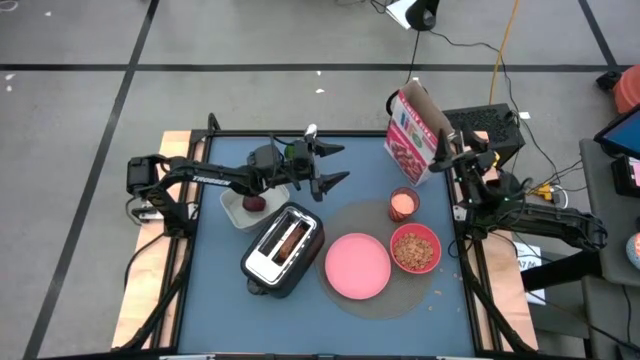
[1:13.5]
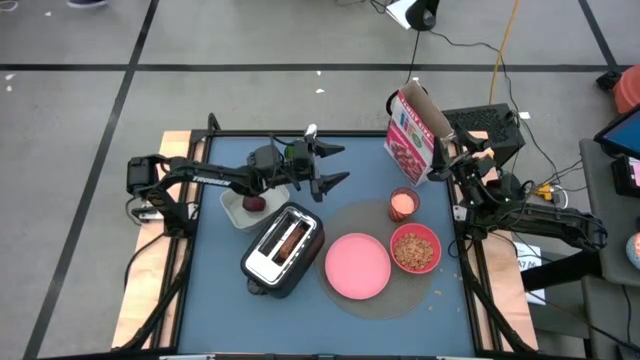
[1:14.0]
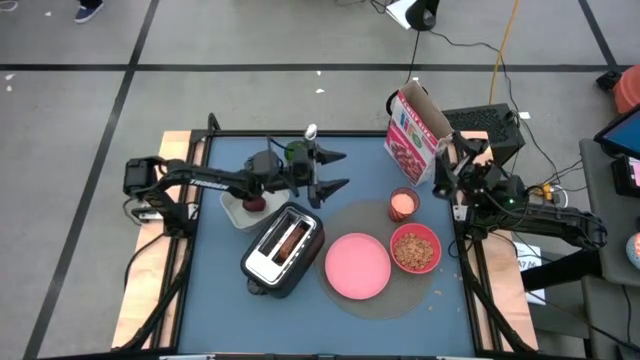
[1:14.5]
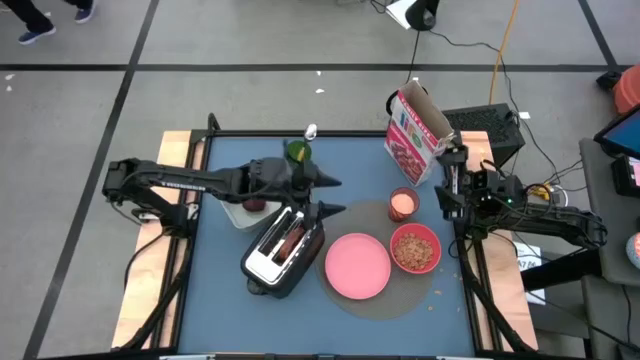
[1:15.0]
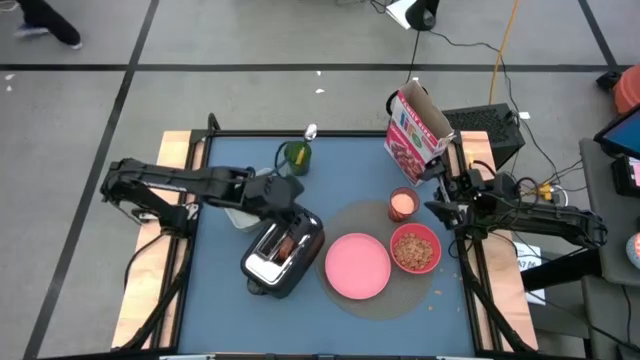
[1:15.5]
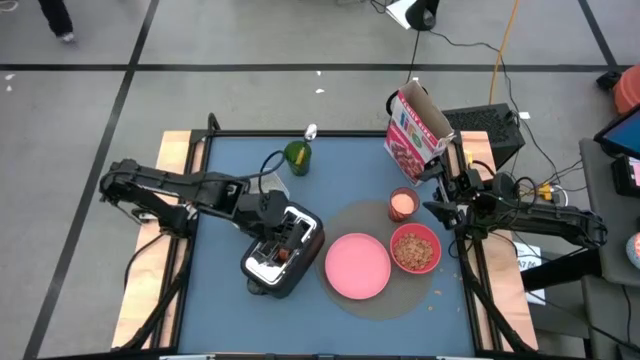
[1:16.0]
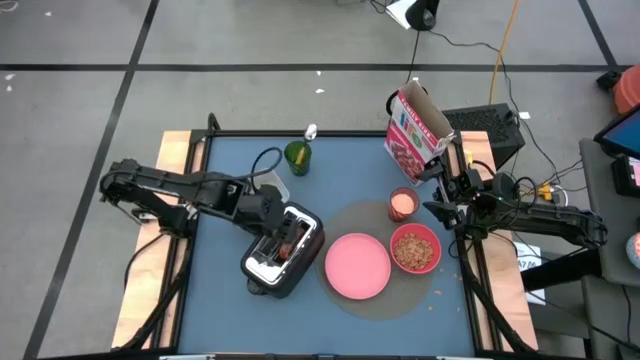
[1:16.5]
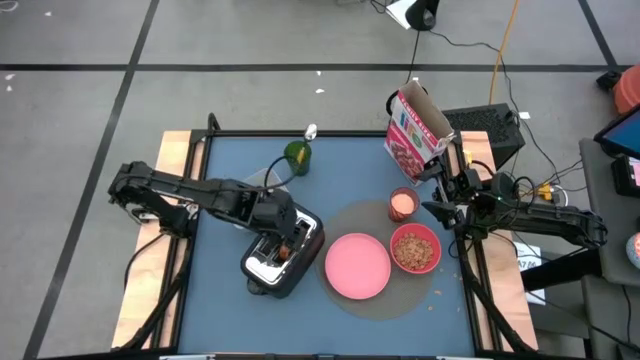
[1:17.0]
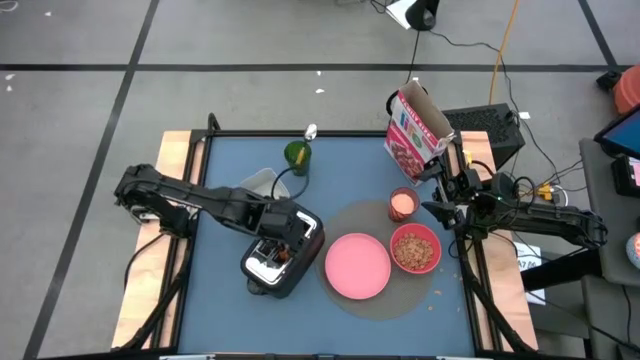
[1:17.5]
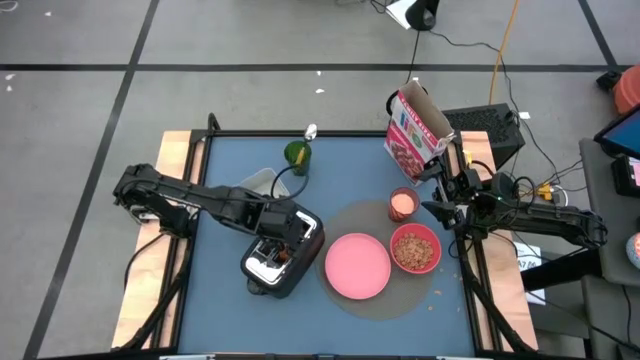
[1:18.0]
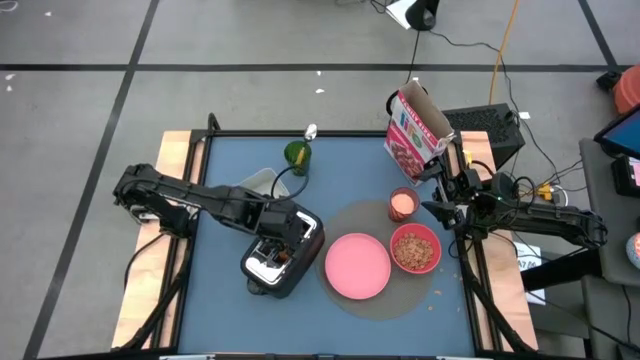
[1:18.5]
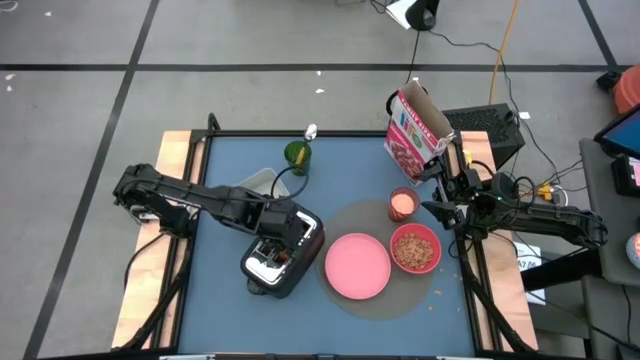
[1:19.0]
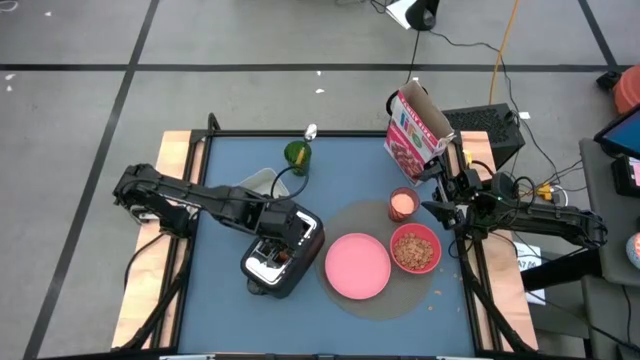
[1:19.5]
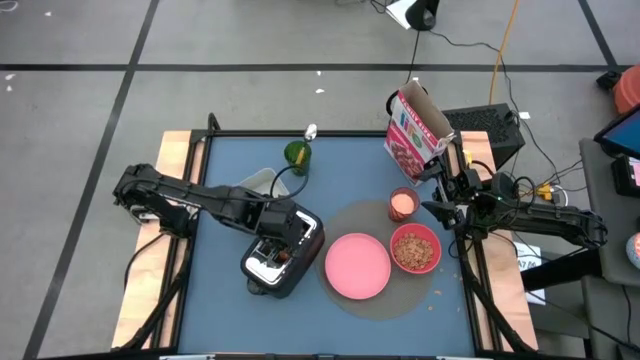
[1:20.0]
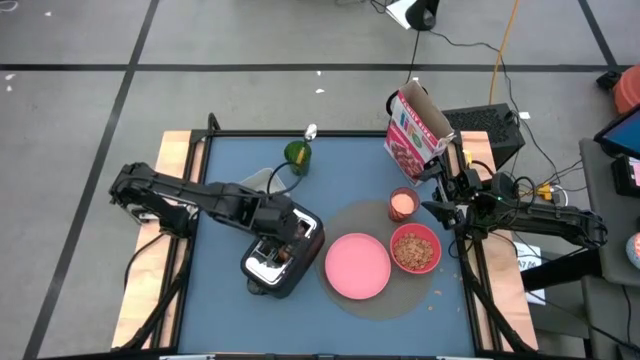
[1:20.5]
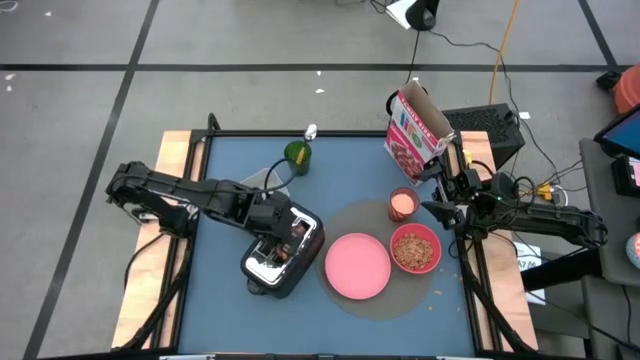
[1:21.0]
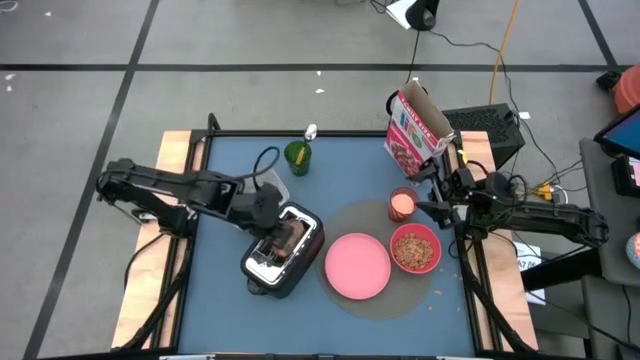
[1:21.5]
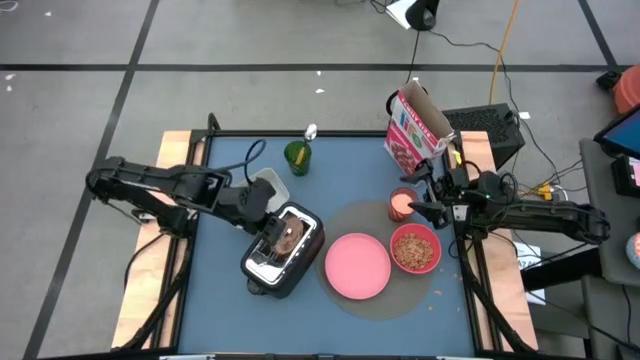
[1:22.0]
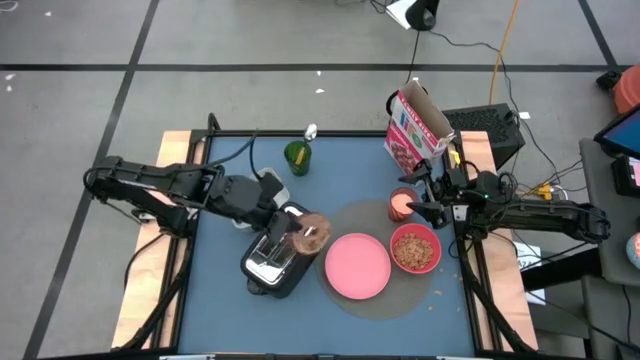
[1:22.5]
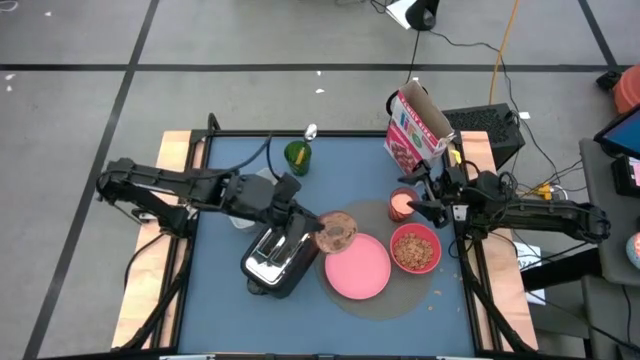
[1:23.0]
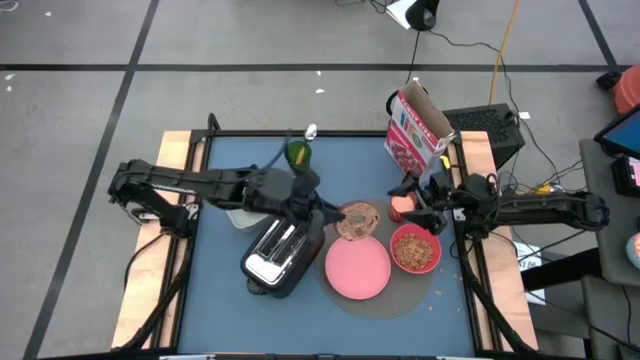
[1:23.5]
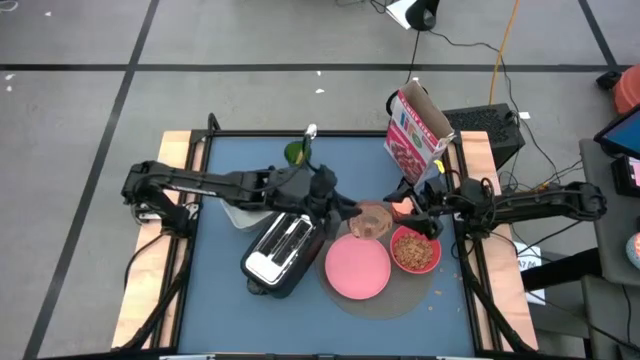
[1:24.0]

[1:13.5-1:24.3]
Task: Arrange a breakfast setting
Put the bagel on the pink plate

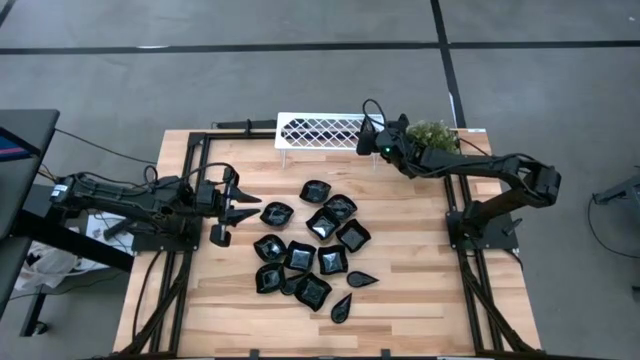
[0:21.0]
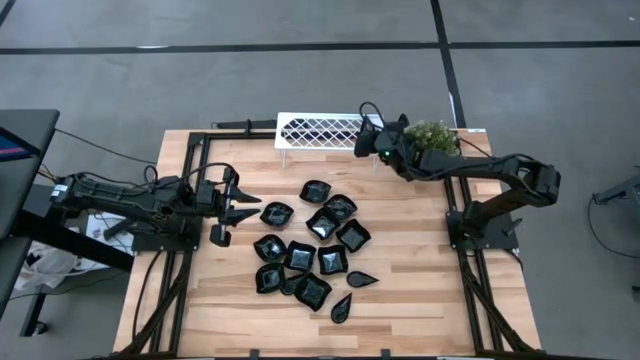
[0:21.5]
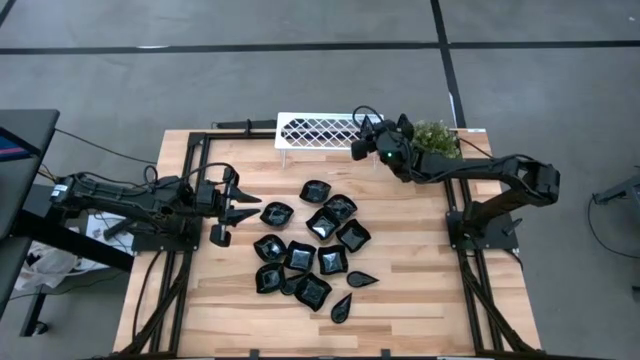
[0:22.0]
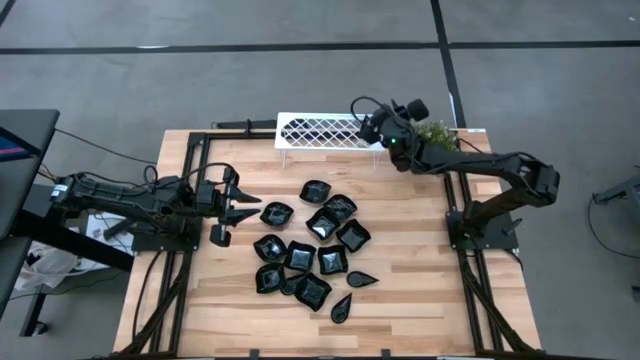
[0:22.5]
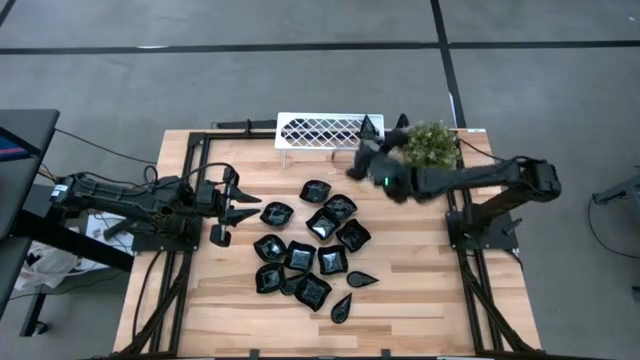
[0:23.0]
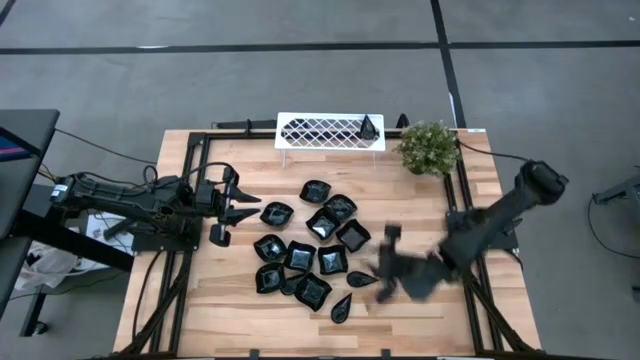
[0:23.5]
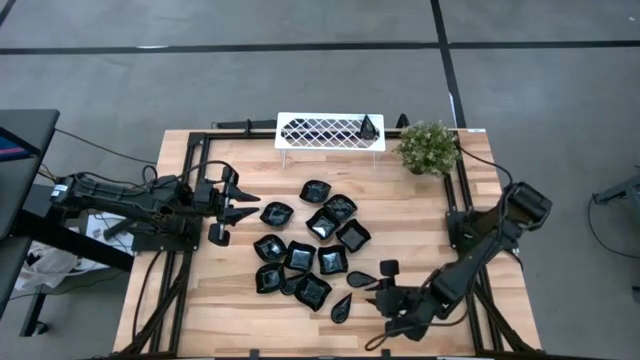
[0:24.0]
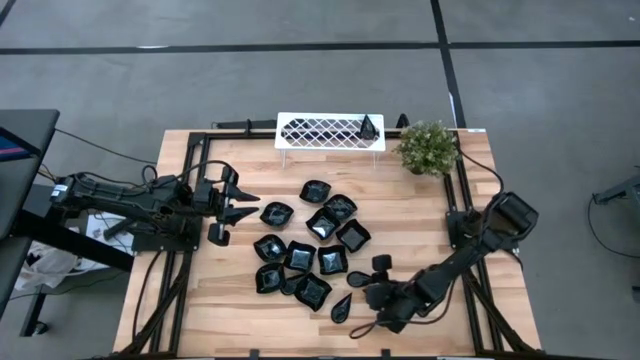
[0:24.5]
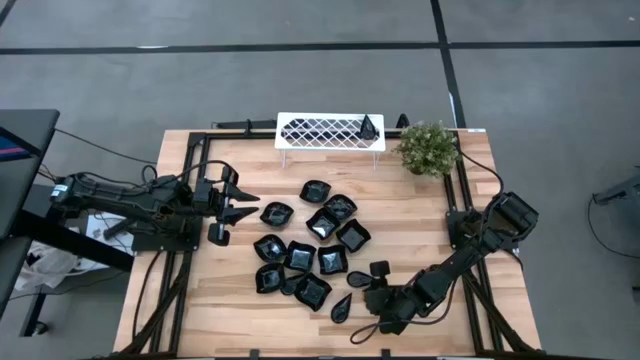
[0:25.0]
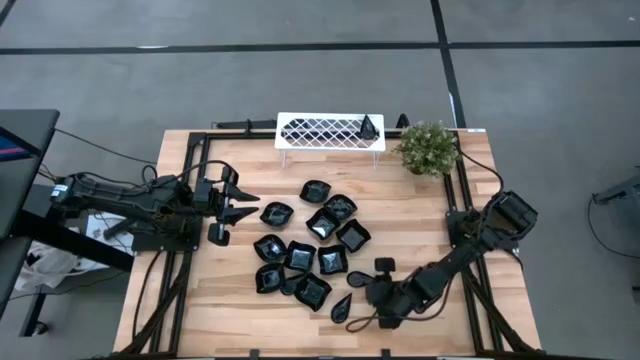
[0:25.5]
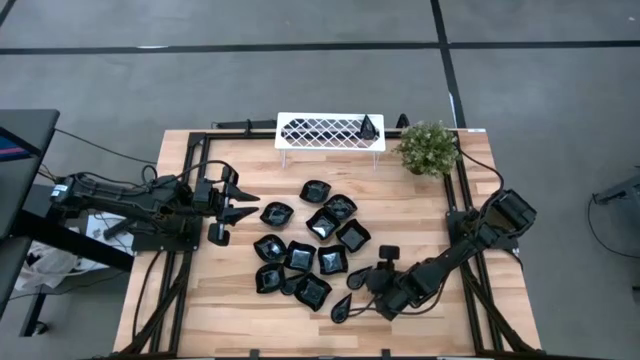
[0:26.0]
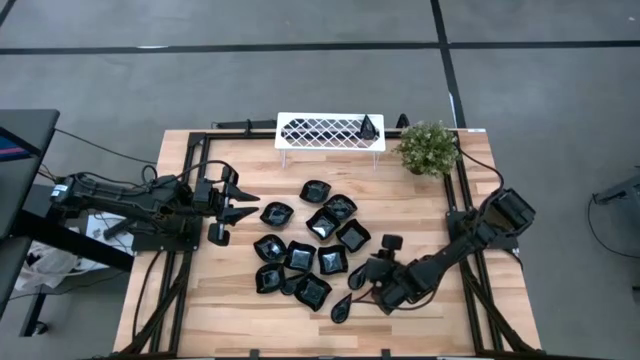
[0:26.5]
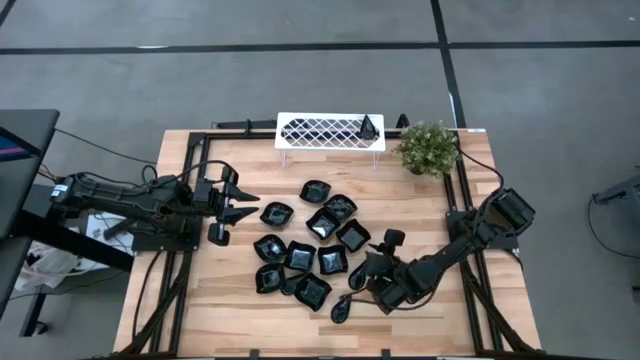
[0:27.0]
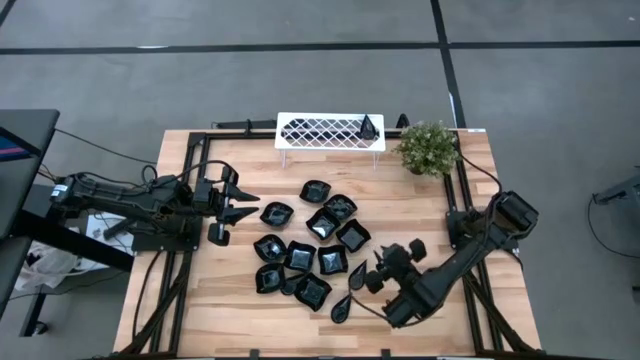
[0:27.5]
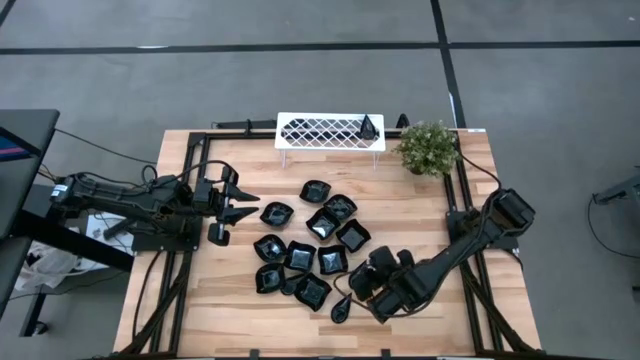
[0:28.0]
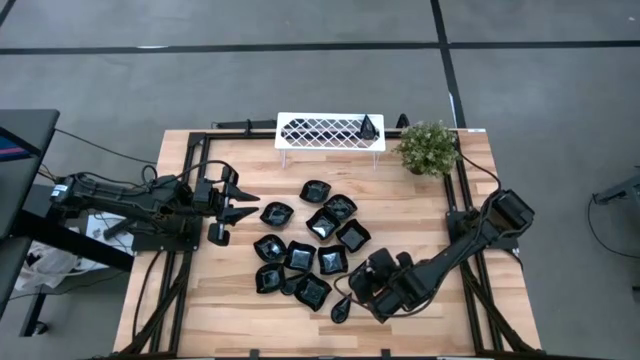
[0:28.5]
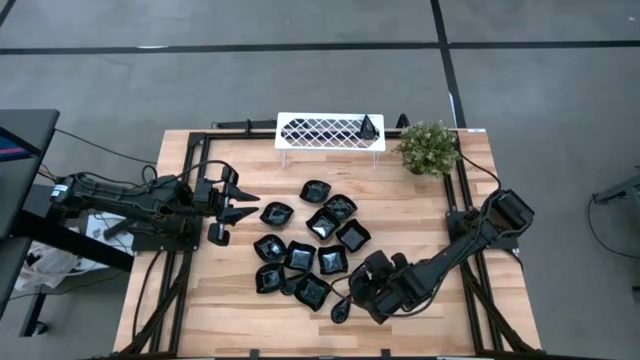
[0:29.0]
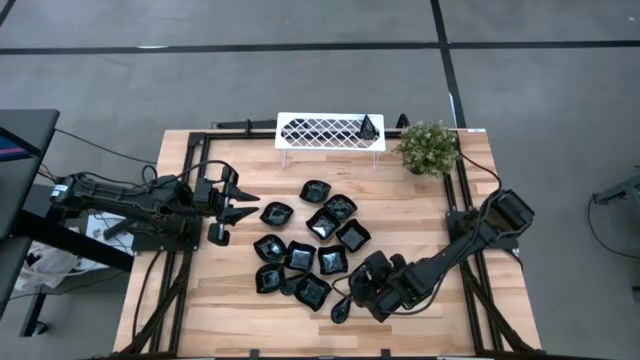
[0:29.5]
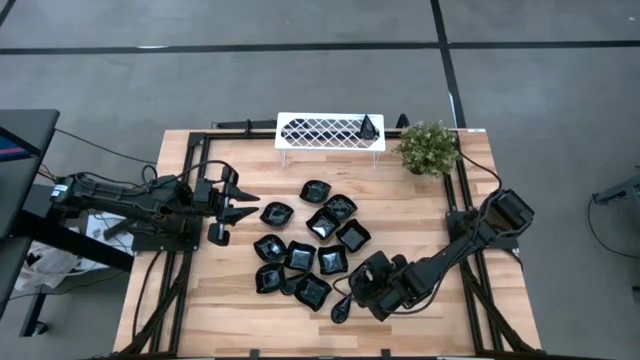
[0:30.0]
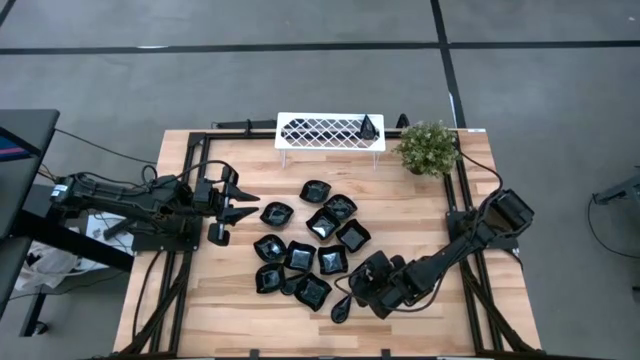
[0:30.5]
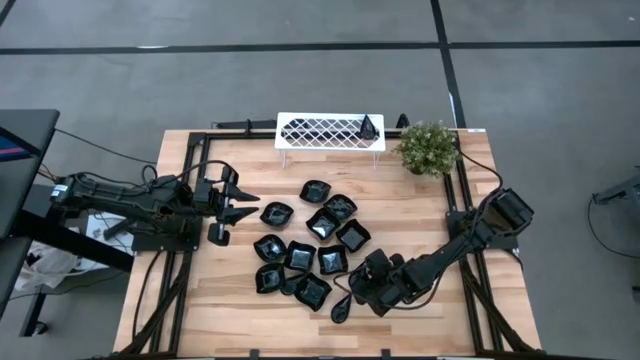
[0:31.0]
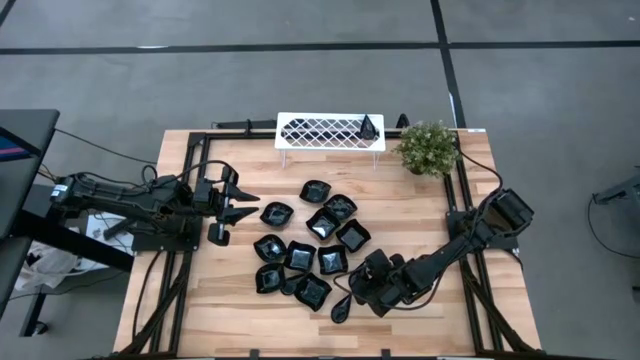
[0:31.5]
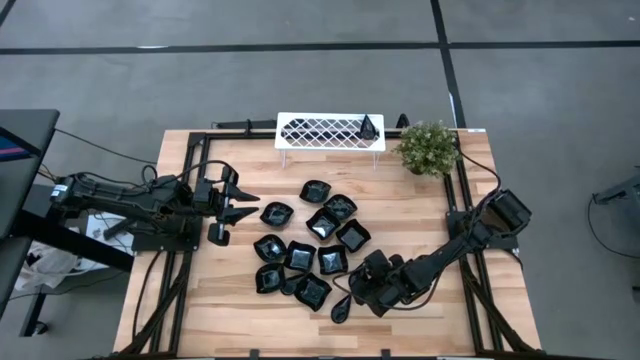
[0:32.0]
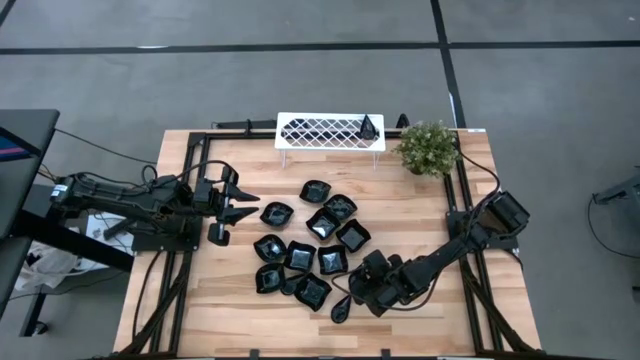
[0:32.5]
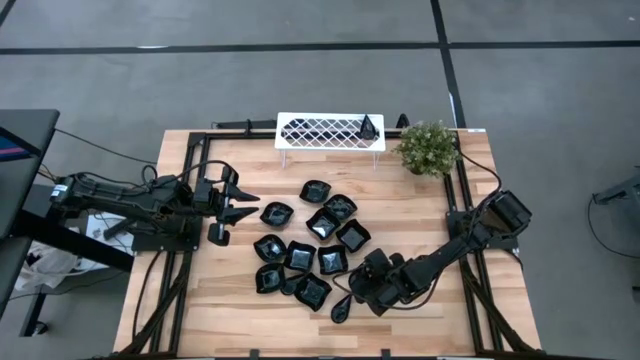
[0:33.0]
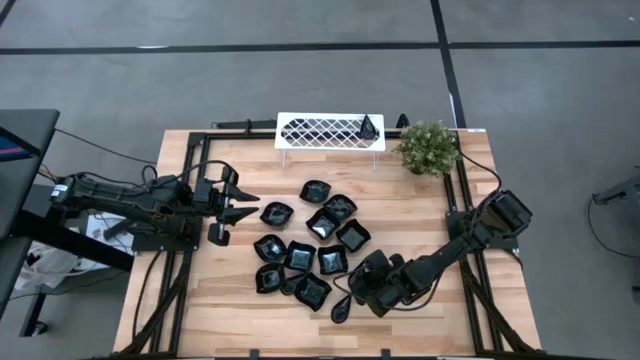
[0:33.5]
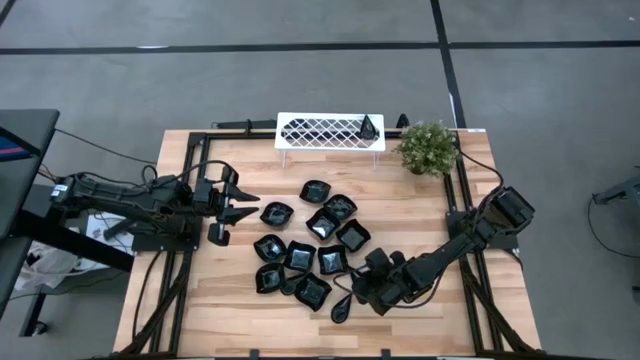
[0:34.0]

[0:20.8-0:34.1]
Task: Pick & Place Mini shaped plates
Stack the top right drop-shaped plate on top of the drop-shaped plates on the shelf
